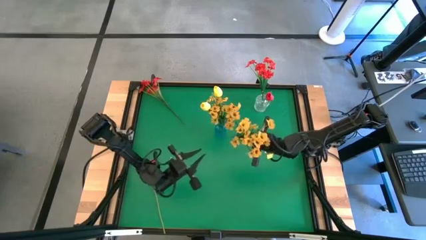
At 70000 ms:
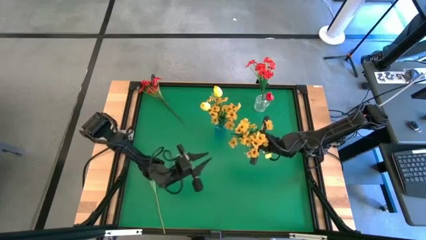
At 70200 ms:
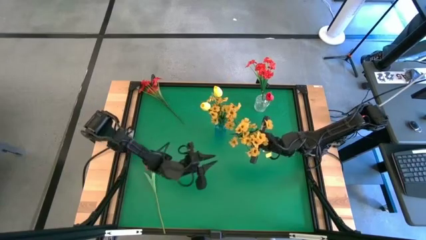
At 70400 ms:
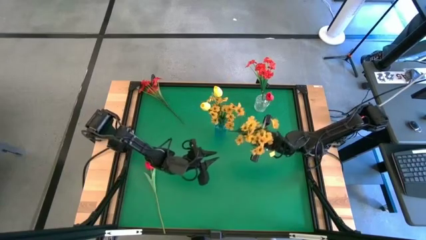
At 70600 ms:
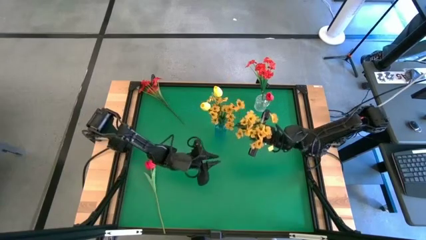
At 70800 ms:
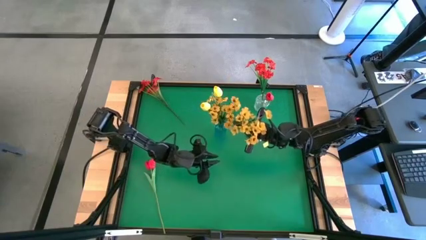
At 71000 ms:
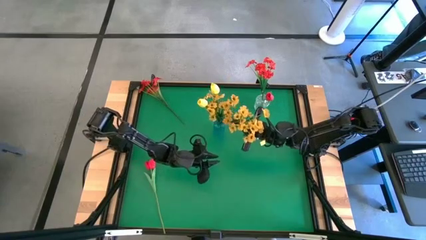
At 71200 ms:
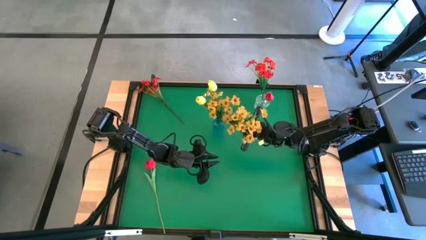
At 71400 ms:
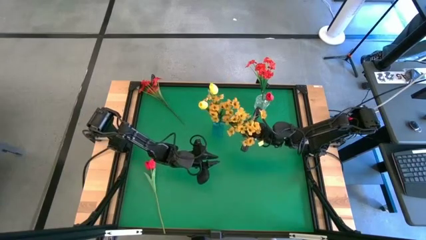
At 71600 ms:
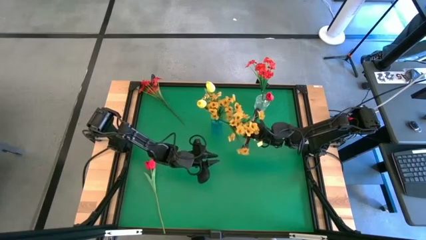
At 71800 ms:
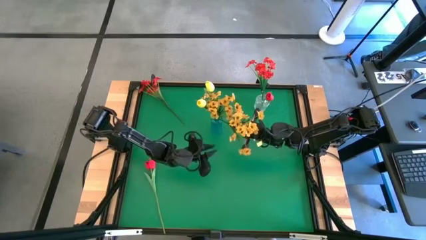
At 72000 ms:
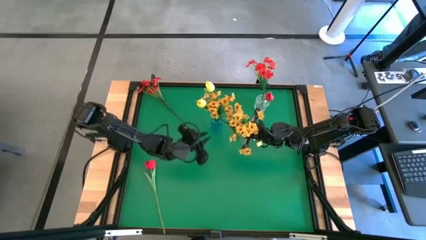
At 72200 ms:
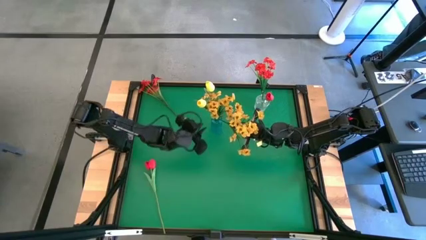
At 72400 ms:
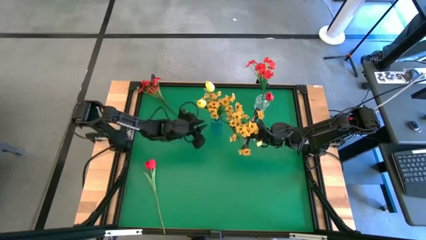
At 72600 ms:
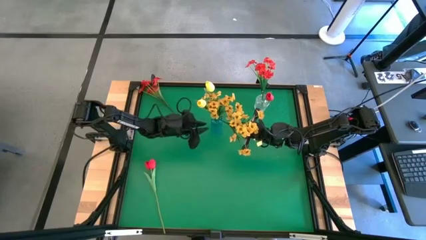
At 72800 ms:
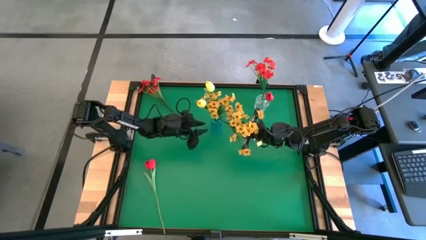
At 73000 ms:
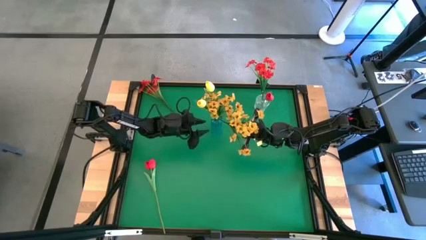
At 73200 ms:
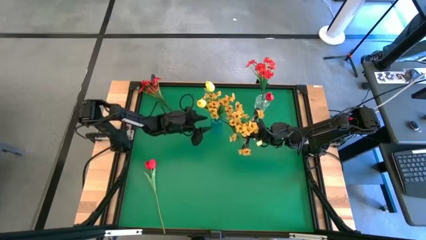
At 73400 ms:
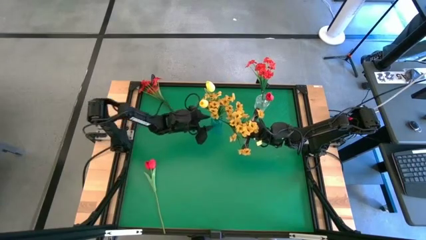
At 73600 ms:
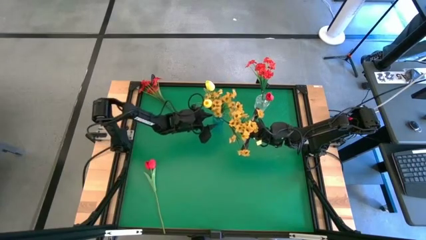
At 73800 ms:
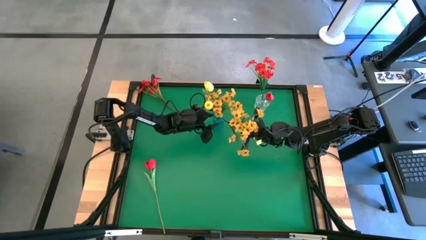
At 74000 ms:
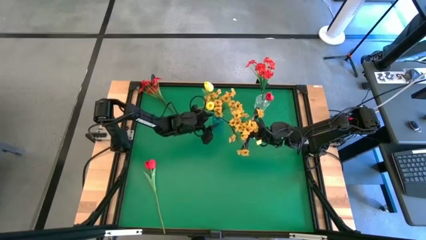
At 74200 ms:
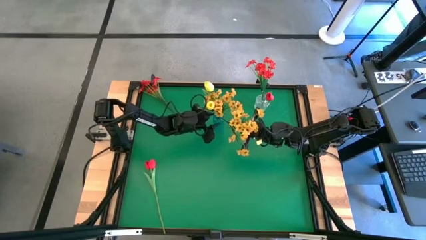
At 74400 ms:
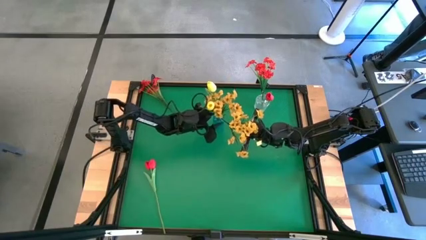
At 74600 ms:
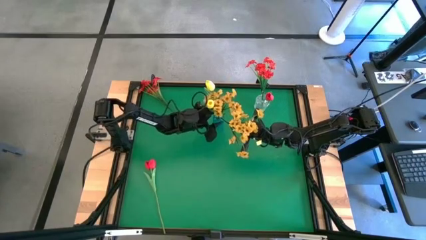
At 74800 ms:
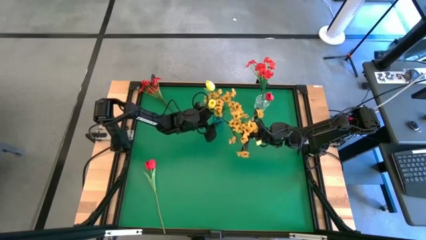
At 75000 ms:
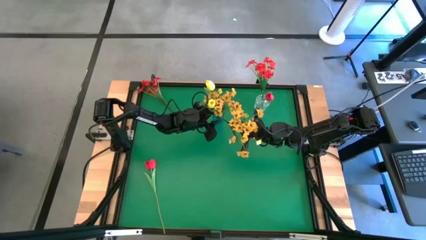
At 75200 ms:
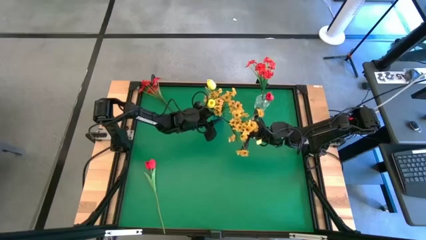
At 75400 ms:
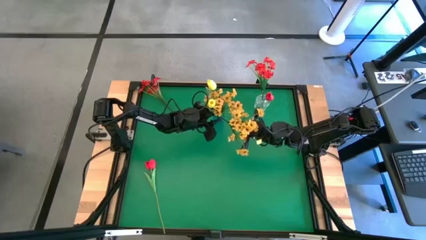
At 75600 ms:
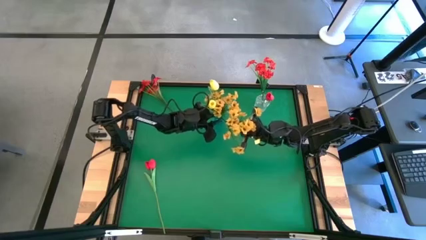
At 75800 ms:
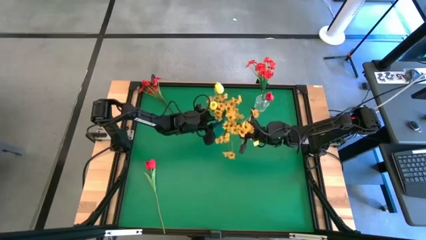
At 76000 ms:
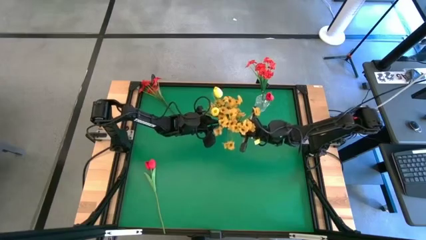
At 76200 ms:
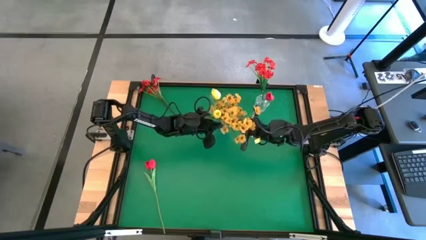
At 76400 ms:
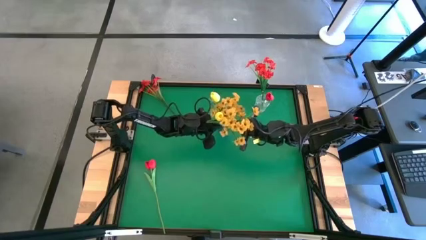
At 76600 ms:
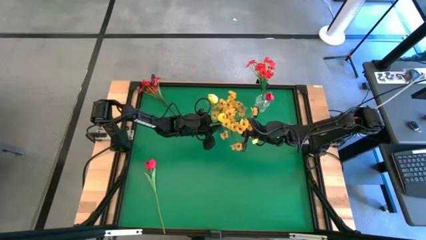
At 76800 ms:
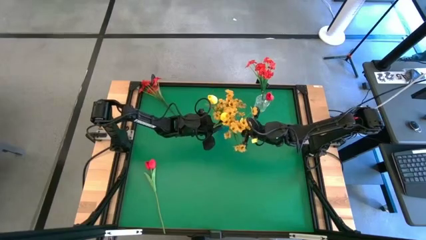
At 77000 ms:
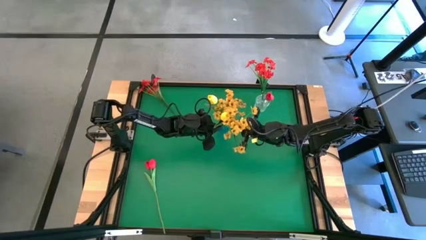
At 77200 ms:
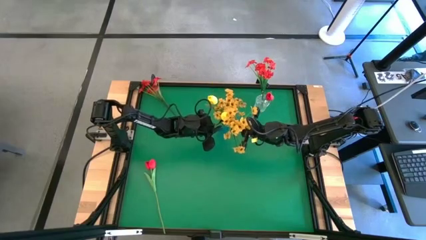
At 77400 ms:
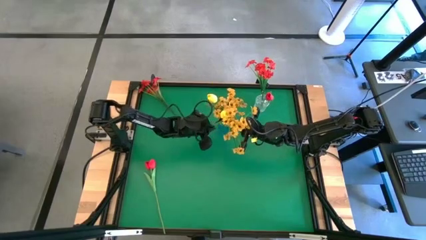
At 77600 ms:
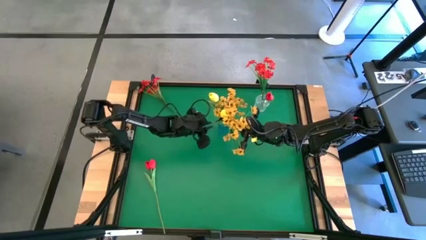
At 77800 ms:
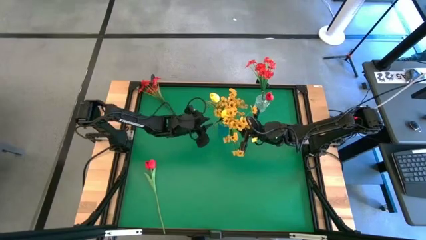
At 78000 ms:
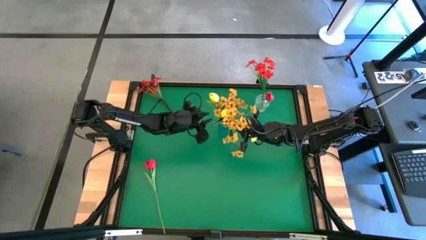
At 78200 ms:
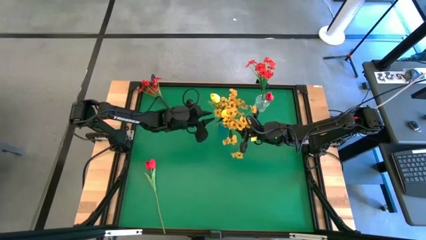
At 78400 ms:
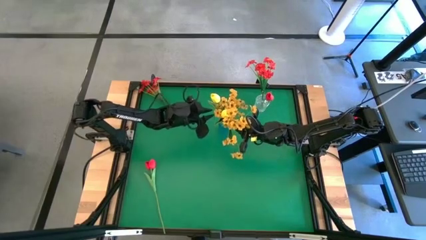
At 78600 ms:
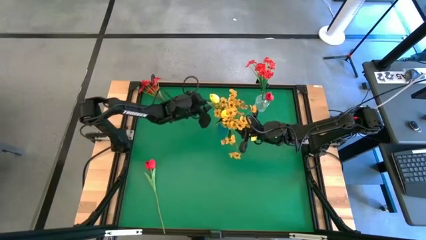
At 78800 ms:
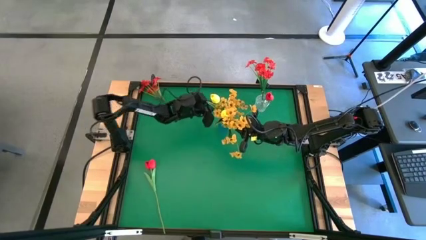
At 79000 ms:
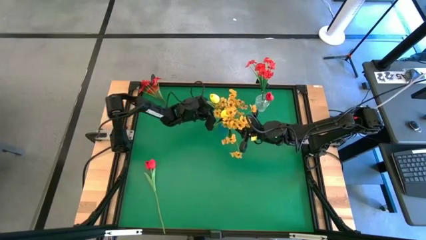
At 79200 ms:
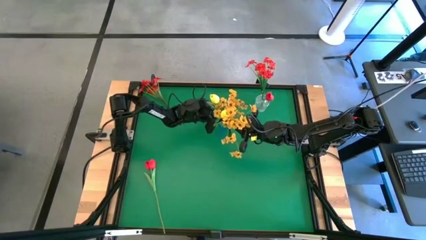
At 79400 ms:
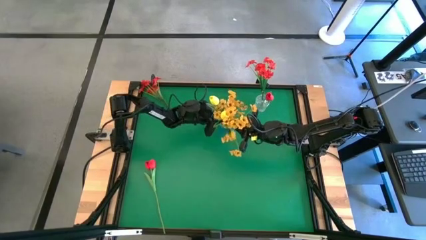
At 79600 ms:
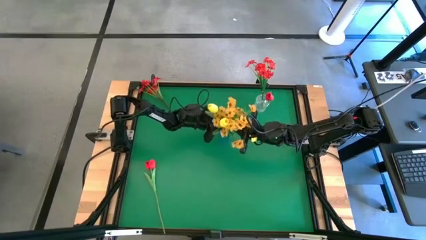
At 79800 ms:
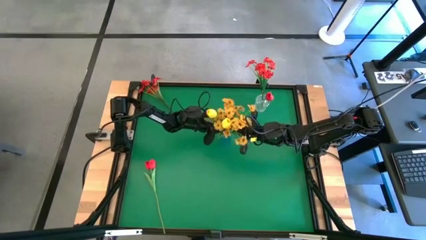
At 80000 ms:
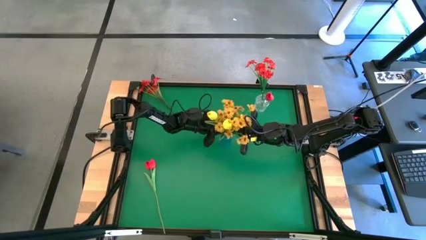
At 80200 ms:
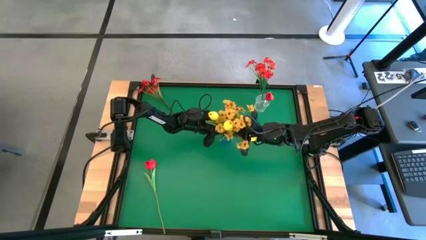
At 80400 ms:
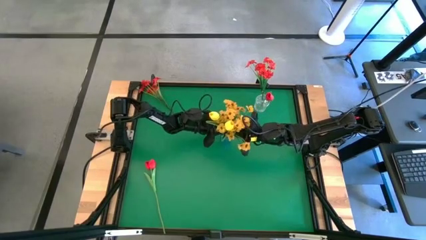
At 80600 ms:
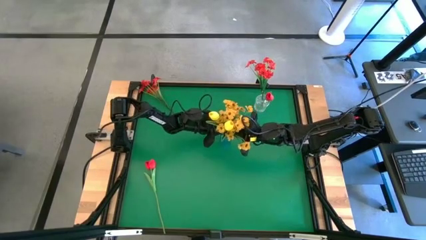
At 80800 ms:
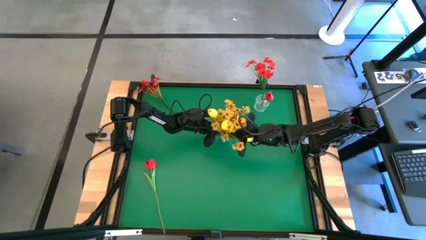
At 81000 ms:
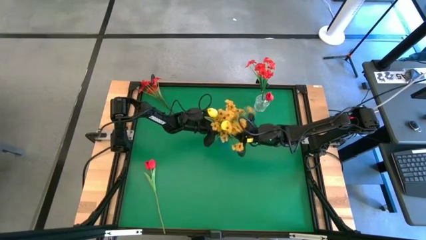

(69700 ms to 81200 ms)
Task: Sort flowers into vase by color
Put the yellow flowers into the blue crystal vase

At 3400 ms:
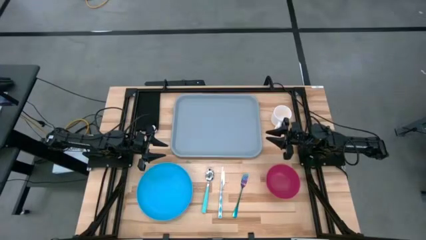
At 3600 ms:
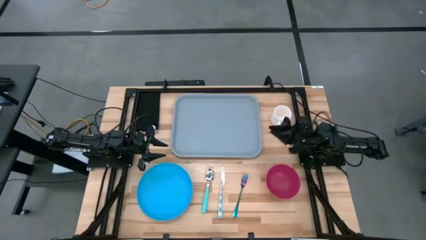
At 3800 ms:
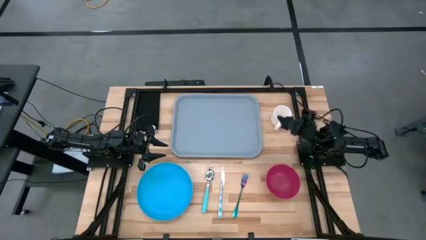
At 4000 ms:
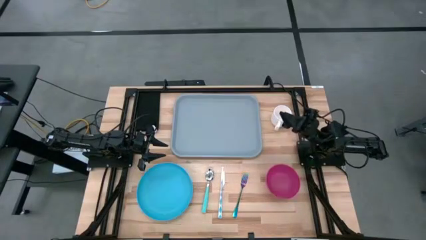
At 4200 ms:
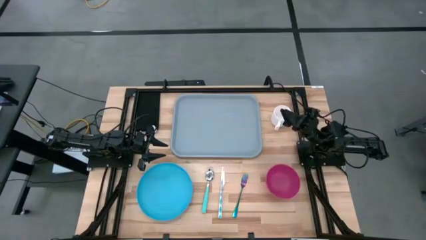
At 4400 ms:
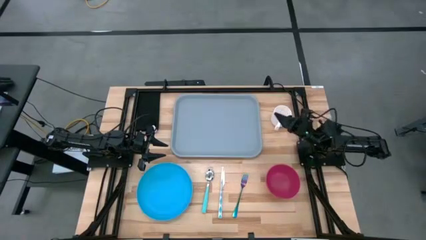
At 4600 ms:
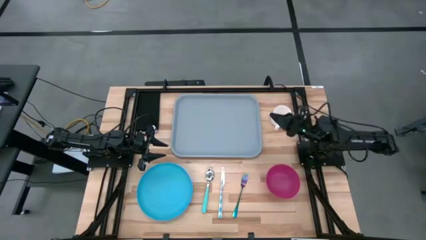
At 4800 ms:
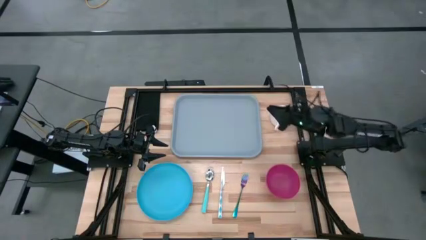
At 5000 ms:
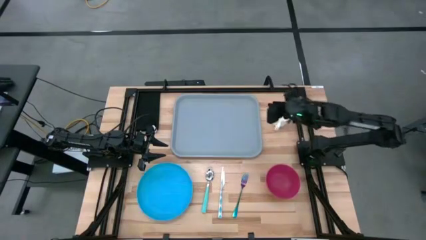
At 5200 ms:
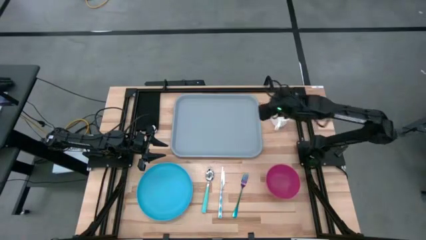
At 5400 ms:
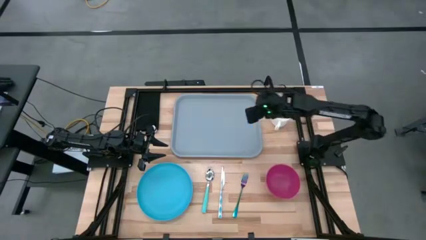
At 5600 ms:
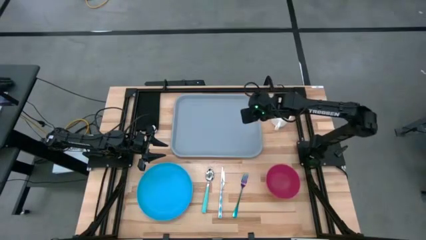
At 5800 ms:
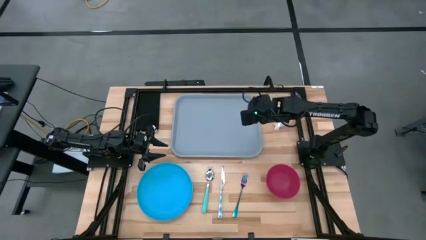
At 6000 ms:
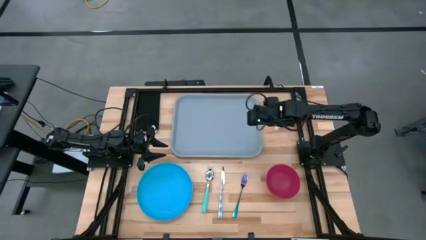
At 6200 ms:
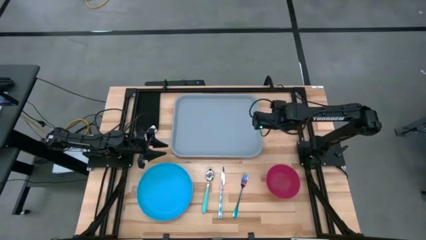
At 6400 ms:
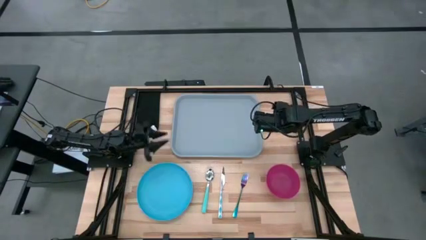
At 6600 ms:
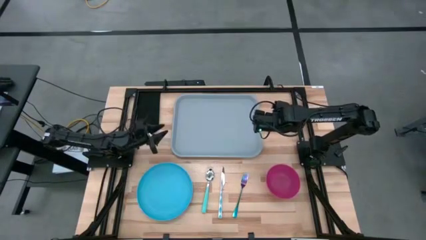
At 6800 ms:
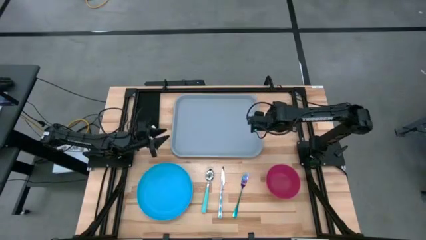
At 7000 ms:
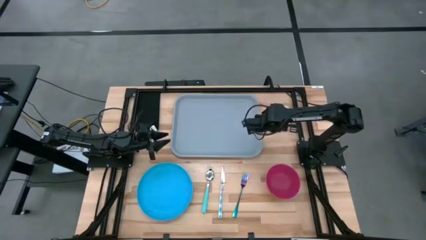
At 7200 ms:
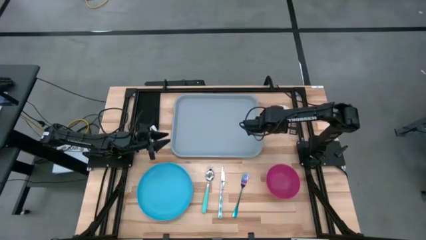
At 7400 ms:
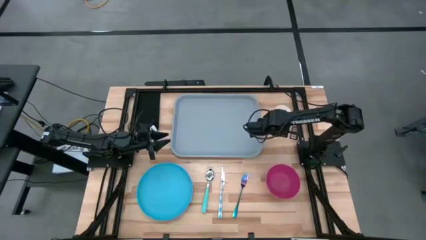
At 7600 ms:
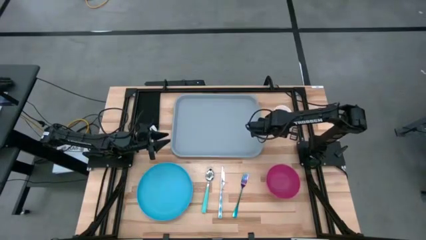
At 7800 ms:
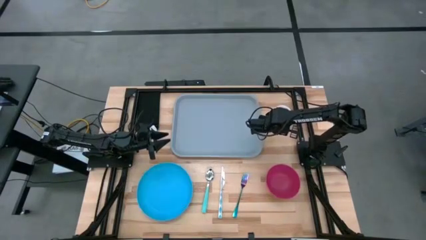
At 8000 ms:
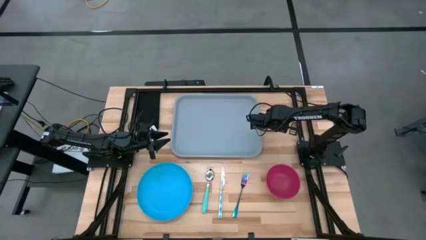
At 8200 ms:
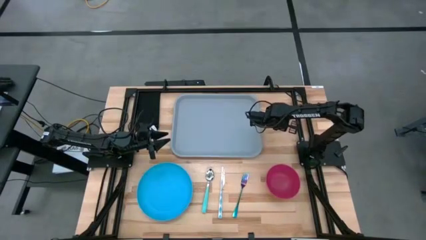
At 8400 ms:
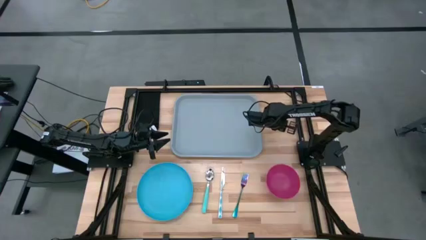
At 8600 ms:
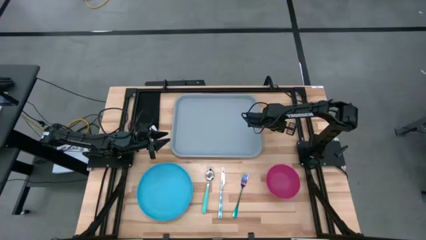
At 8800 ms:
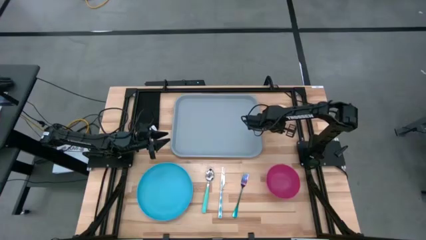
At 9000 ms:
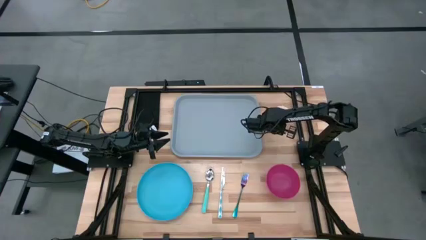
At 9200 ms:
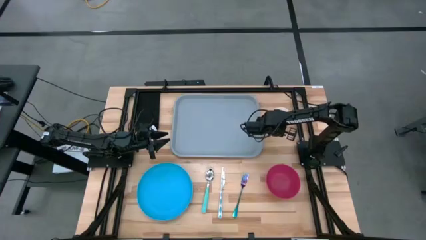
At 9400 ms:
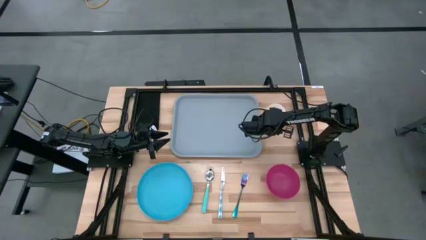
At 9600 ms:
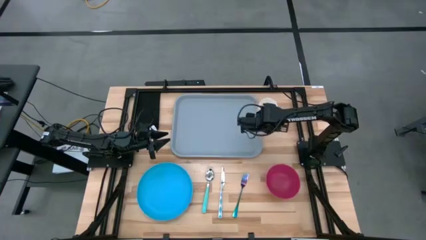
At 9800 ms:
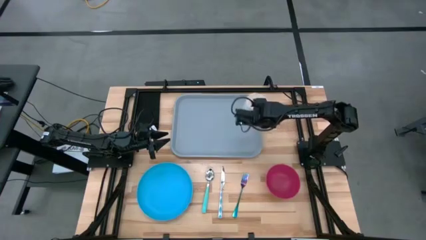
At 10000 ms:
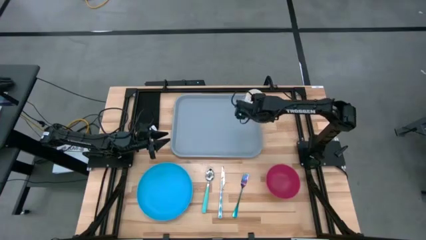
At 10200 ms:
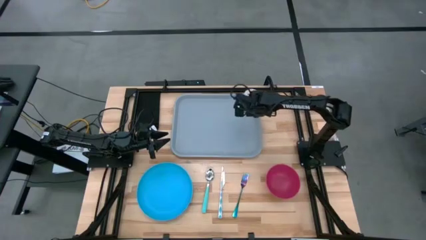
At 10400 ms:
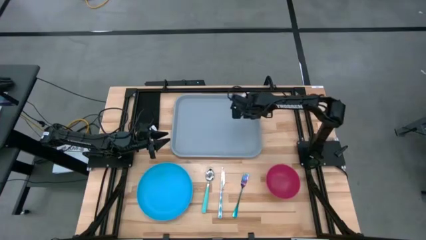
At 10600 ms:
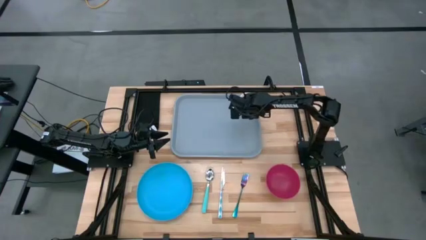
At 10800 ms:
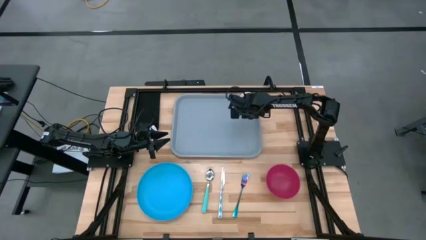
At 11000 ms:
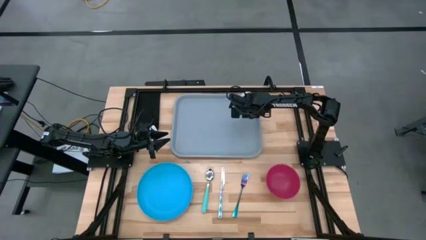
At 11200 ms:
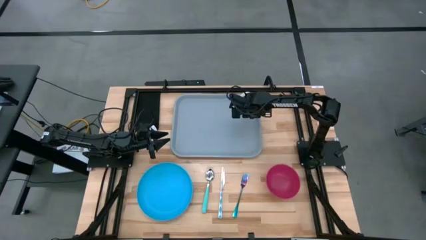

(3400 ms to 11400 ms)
Task: Set up tray
Put the white cup on the gray serving tray
